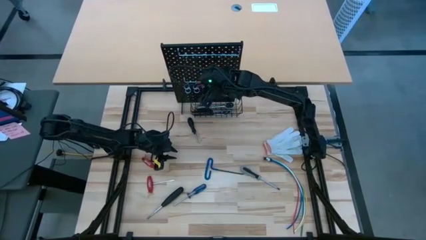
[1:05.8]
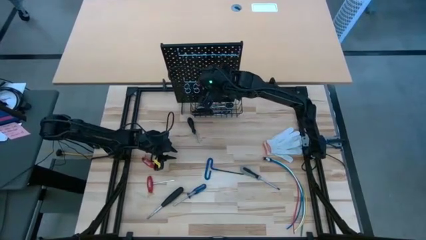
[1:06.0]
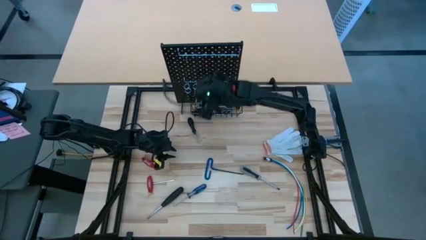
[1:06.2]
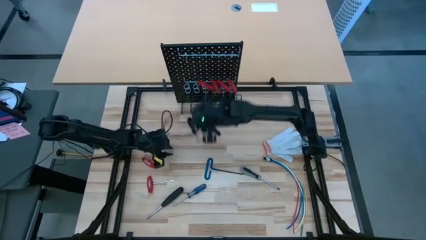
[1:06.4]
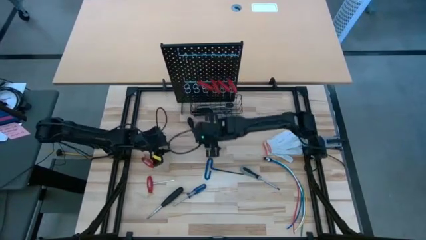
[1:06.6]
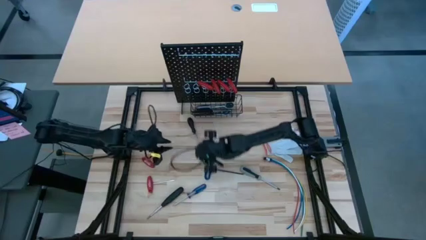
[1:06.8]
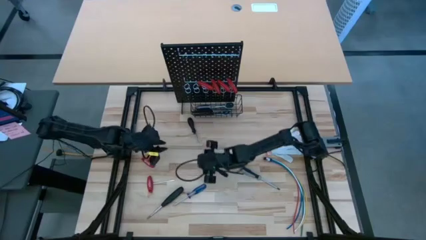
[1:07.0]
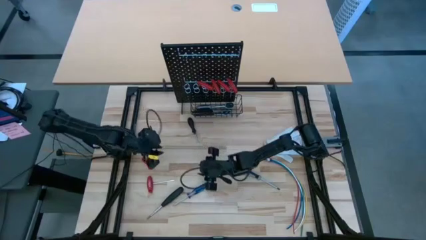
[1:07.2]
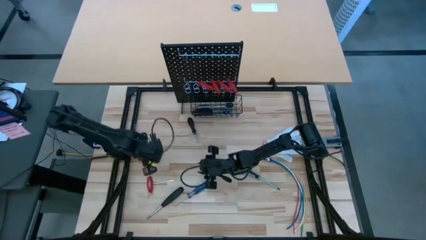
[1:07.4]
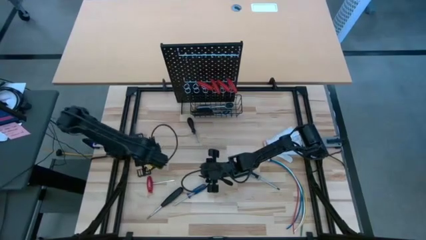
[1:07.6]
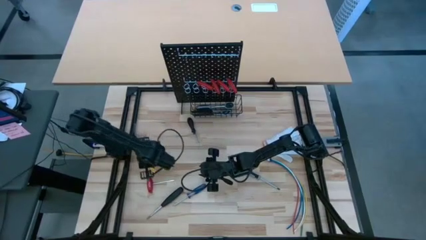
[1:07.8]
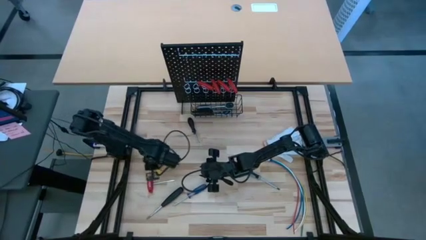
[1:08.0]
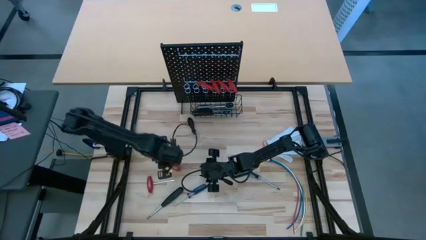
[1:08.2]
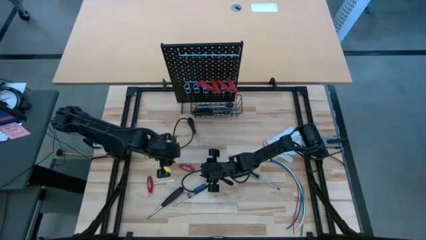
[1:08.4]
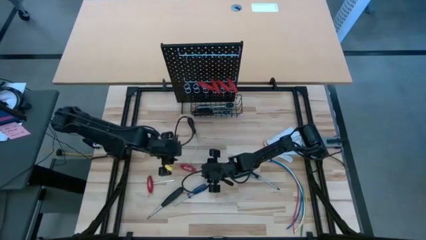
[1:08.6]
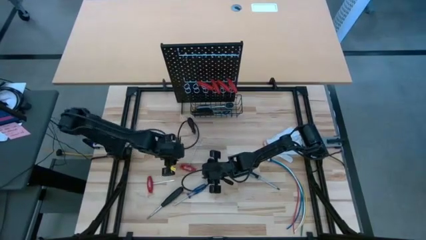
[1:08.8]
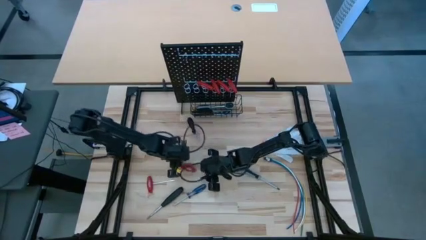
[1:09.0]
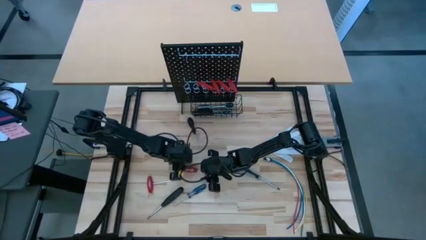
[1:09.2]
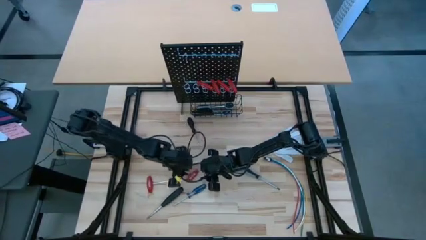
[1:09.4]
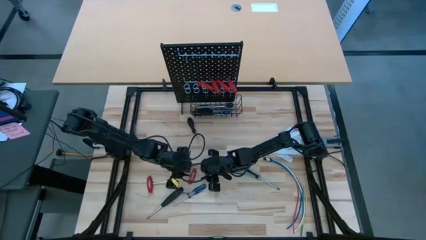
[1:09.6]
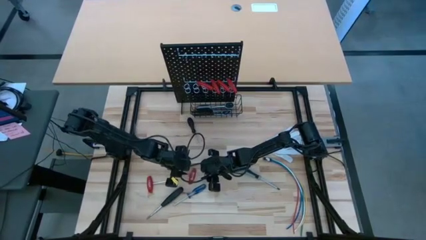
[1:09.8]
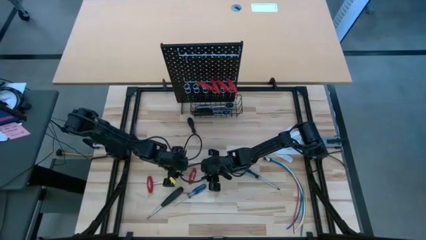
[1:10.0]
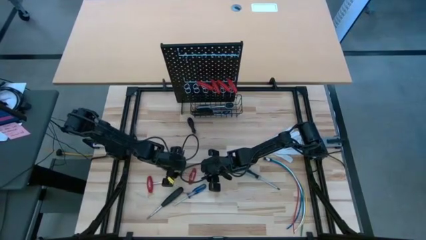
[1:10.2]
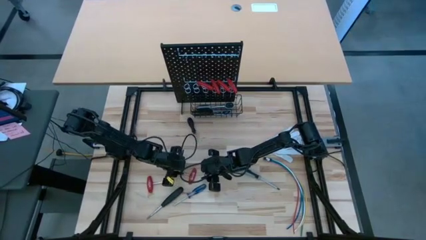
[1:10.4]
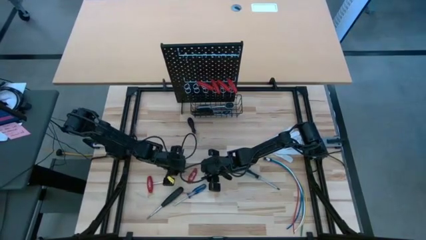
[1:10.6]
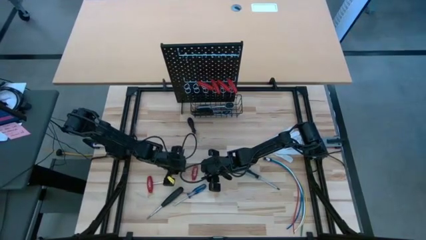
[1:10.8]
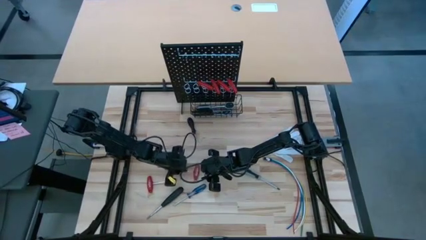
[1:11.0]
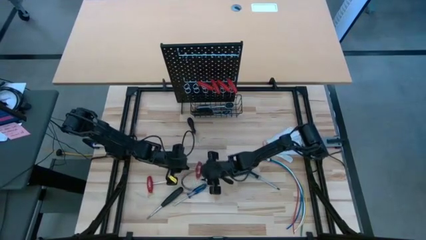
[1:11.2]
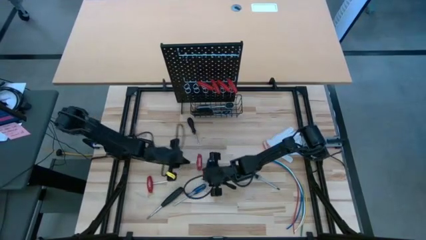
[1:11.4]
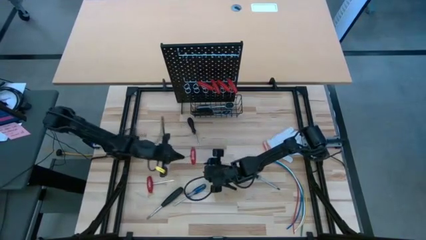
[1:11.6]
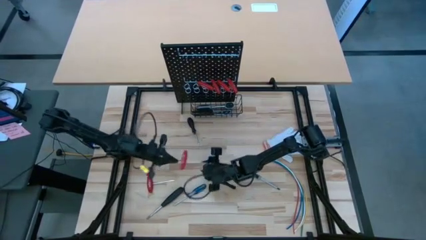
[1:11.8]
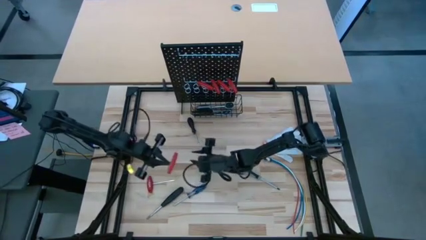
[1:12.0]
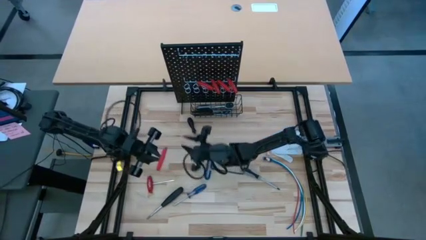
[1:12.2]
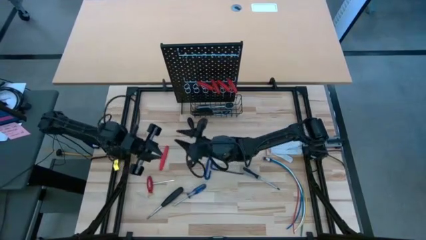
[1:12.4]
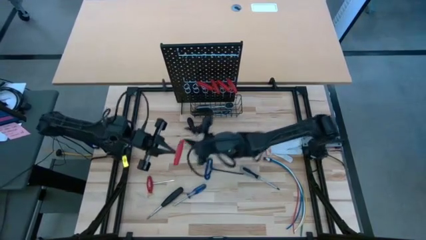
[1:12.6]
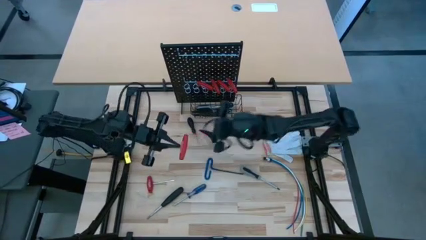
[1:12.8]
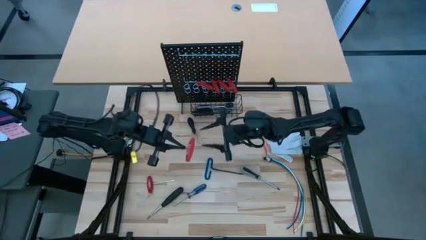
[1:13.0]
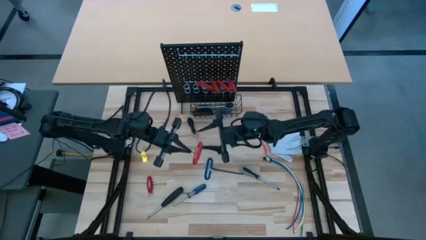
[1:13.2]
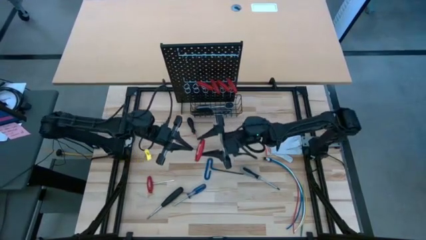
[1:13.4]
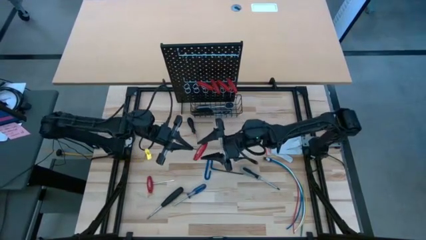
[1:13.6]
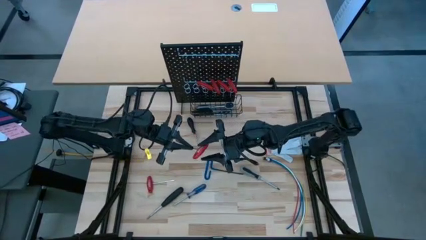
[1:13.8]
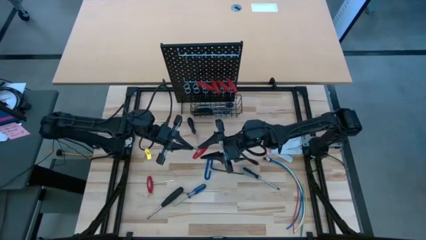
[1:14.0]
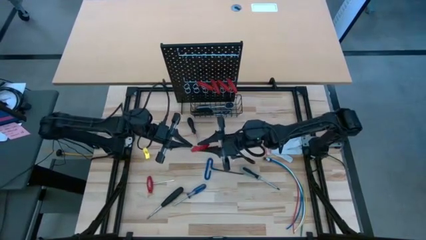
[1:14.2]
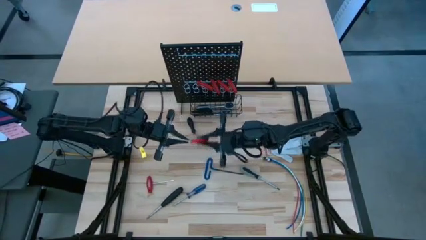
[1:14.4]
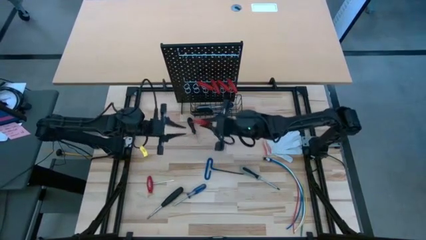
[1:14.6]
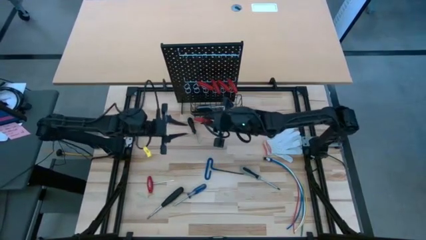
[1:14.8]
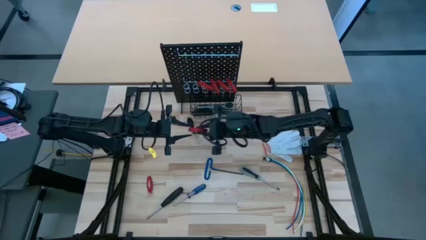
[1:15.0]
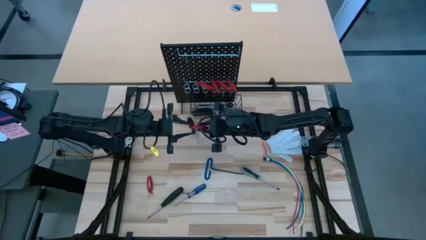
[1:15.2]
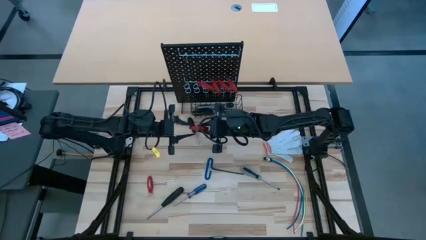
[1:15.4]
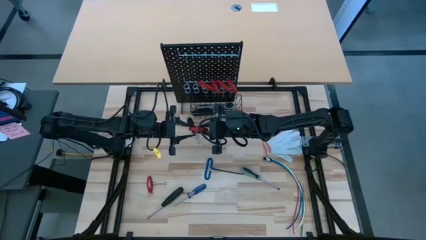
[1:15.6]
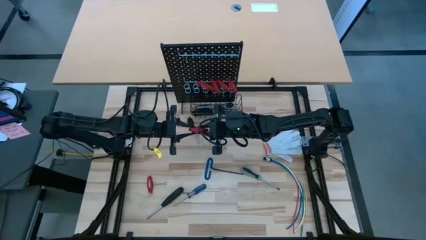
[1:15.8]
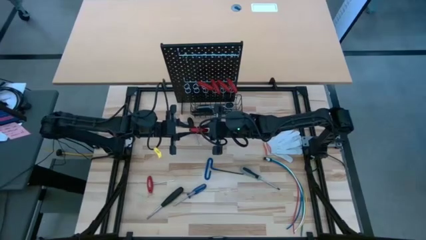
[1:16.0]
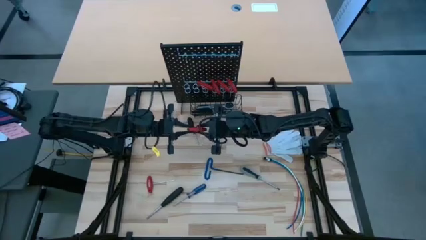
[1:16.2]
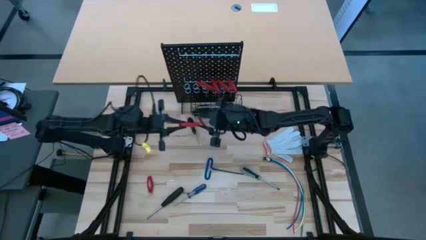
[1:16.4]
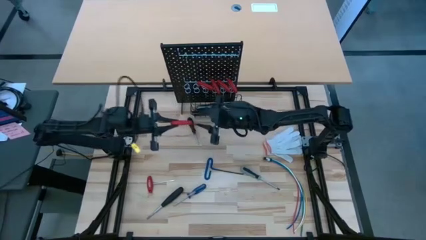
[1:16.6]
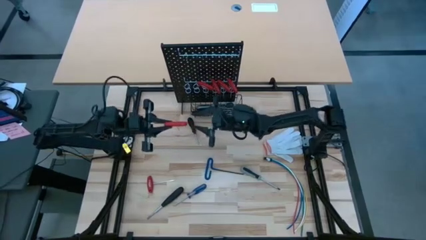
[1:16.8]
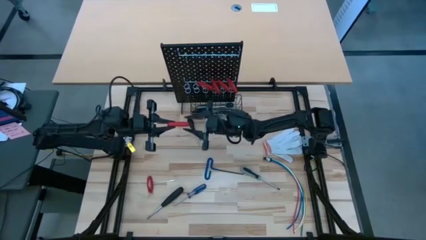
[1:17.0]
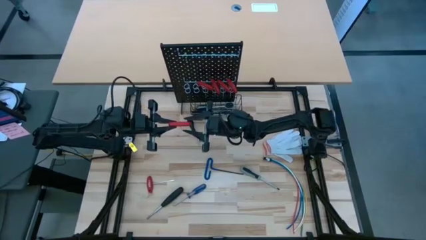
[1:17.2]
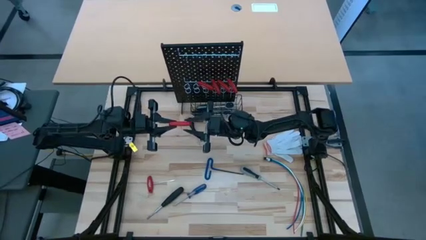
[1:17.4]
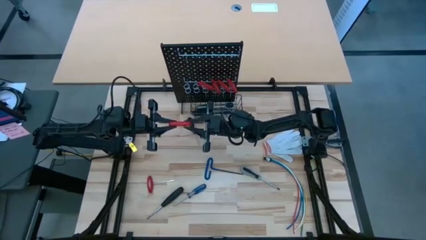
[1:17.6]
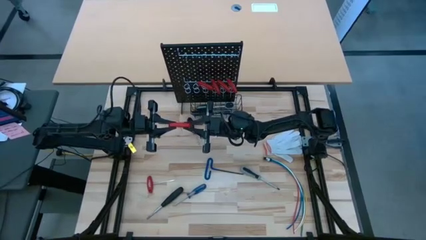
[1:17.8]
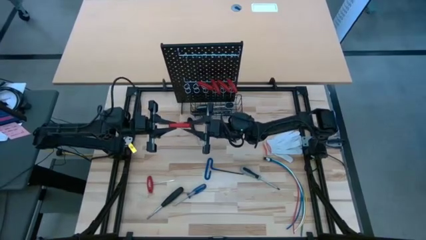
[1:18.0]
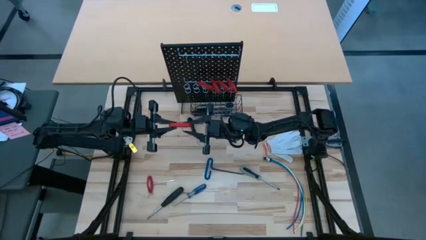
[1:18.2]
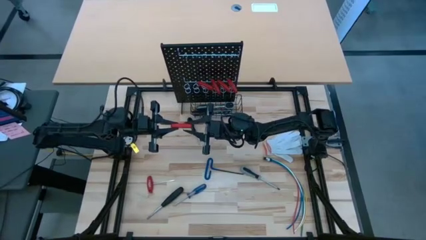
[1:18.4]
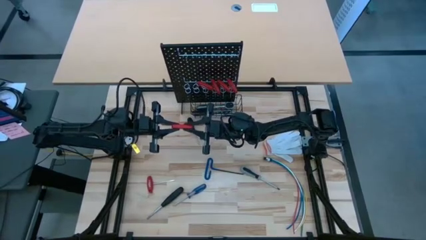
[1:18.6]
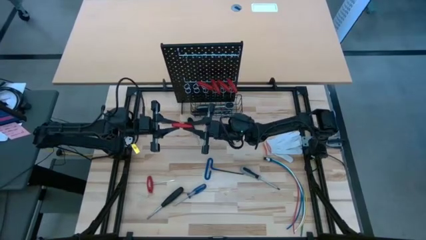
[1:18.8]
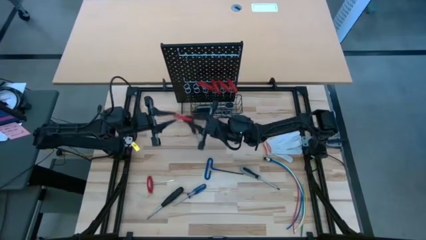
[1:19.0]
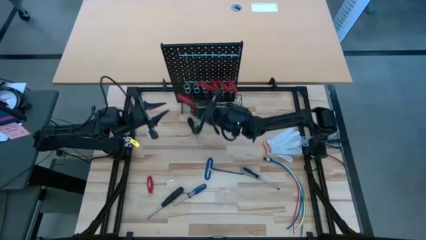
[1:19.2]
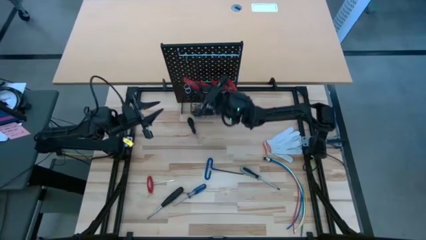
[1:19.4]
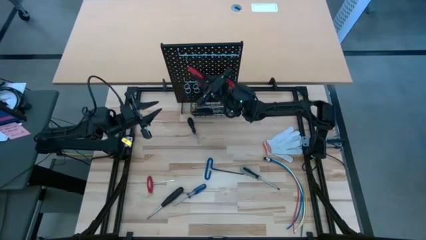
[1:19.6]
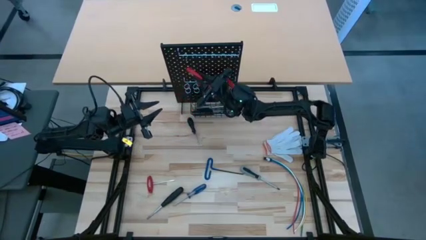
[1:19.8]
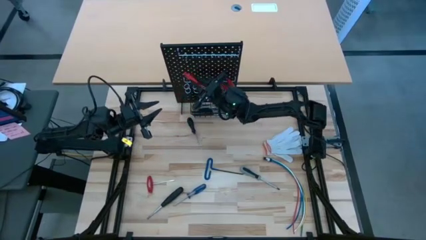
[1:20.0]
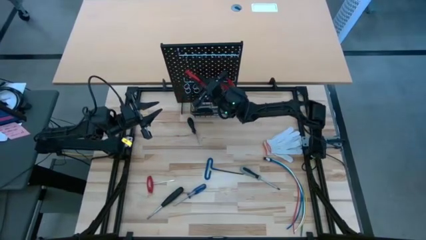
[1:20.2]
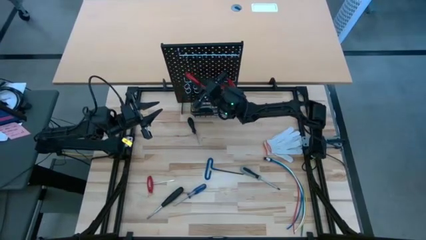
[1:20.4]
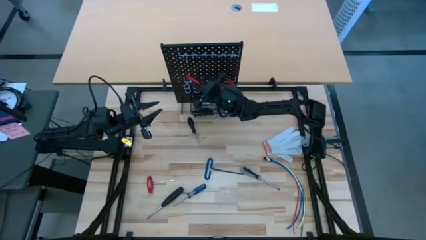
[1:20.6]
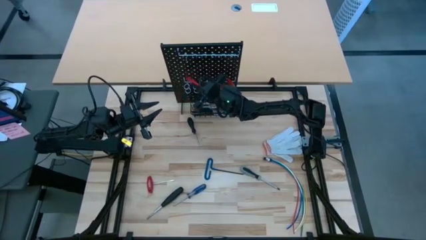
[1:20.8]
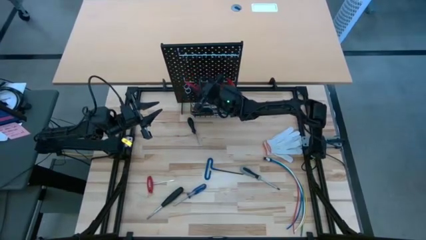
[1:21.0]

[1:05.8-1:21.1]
Task: Hang tools onto peg board
Hang the red Allen wrench on the pegboard
